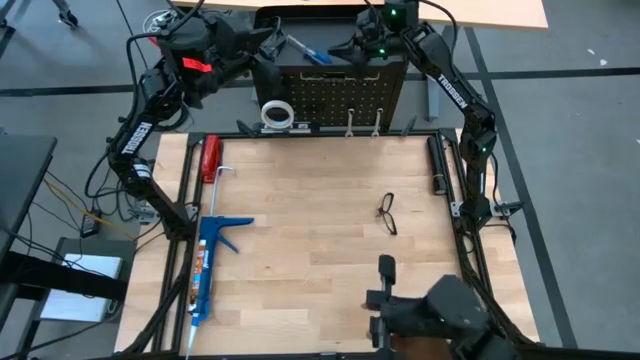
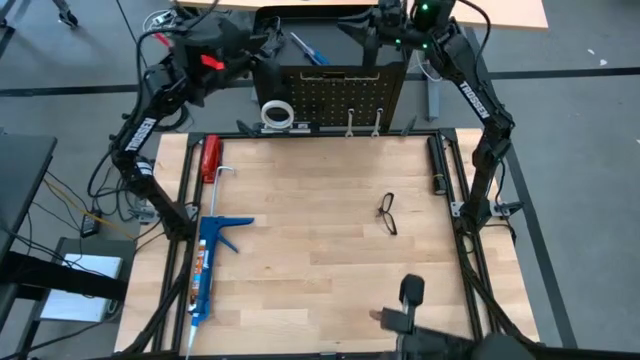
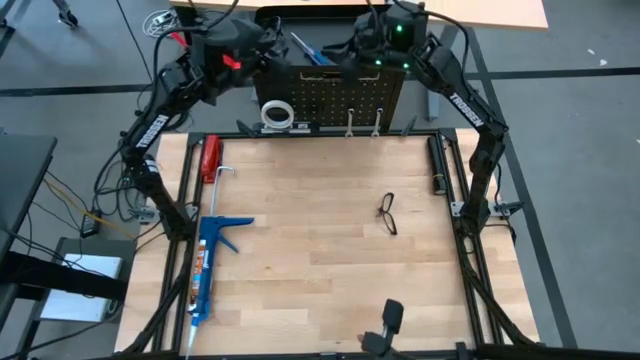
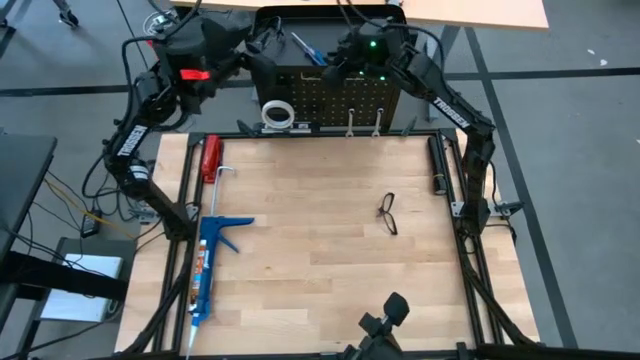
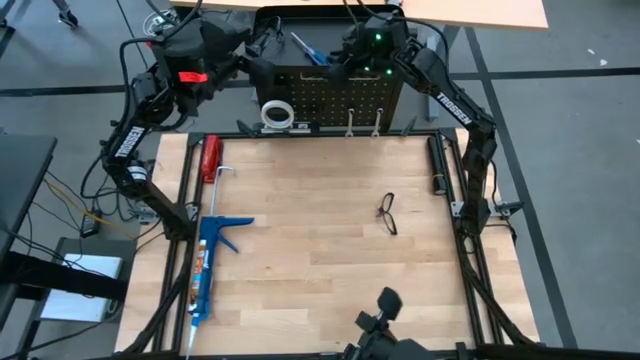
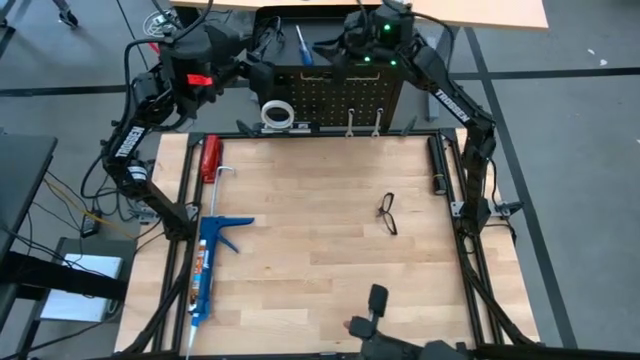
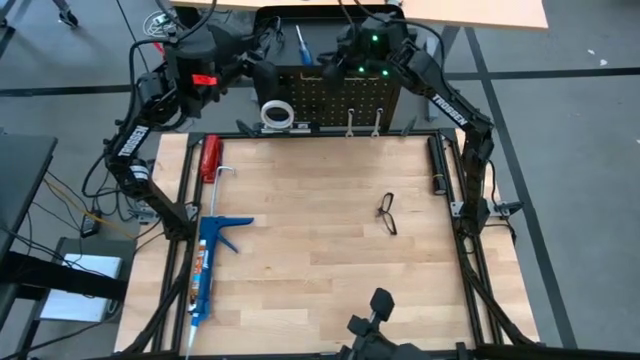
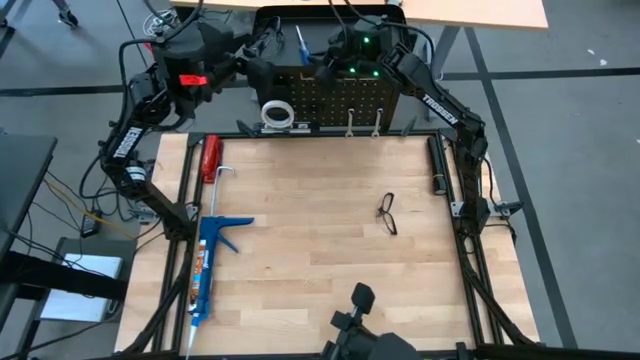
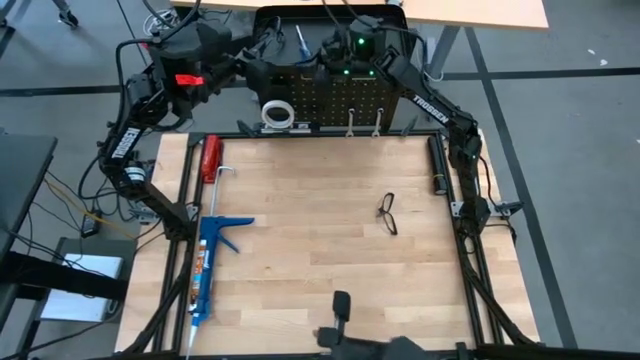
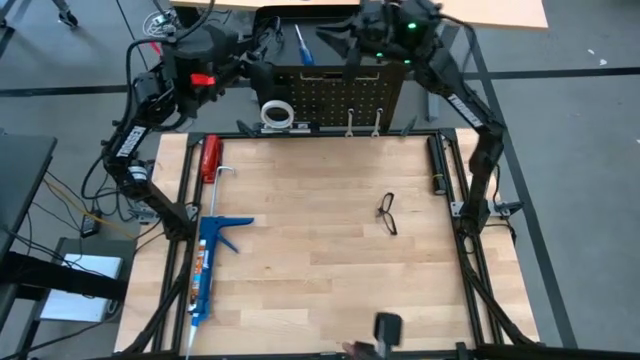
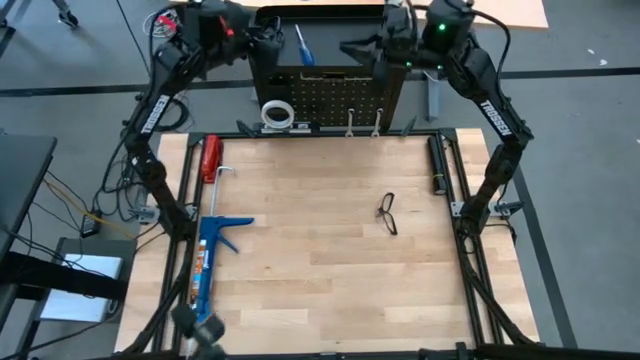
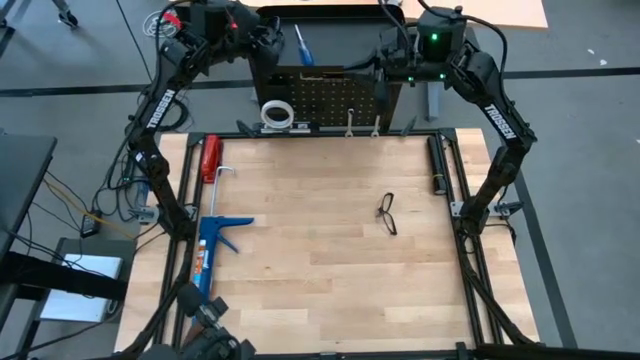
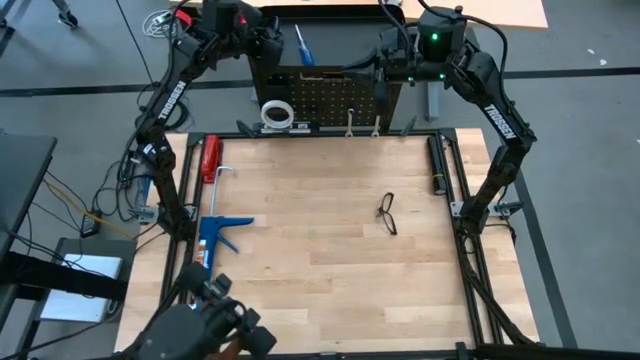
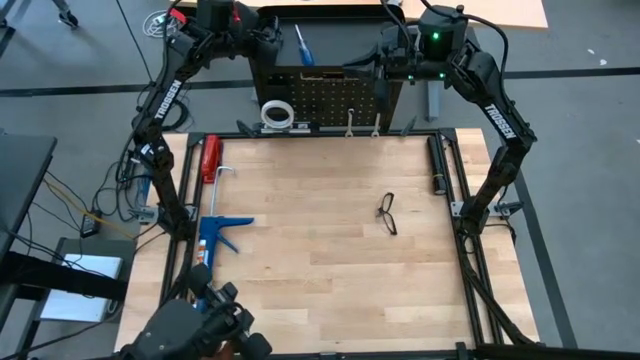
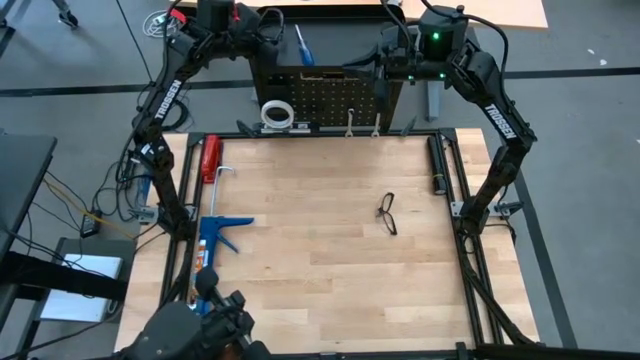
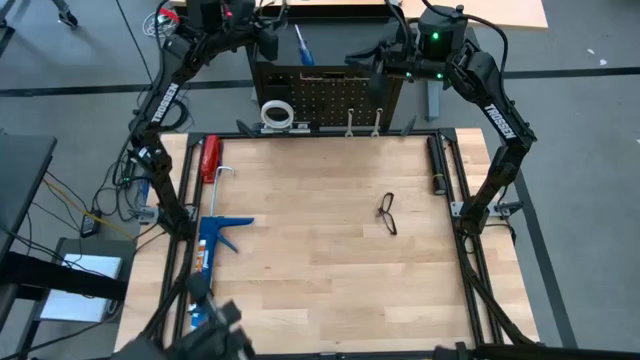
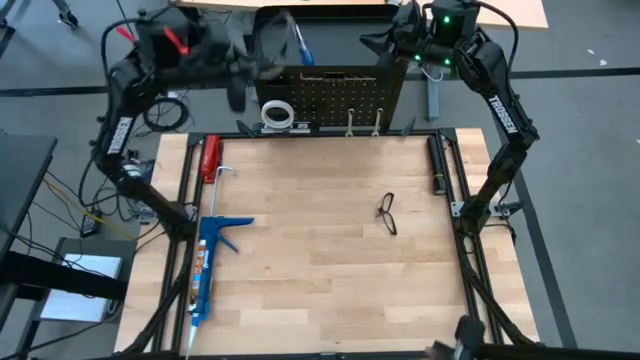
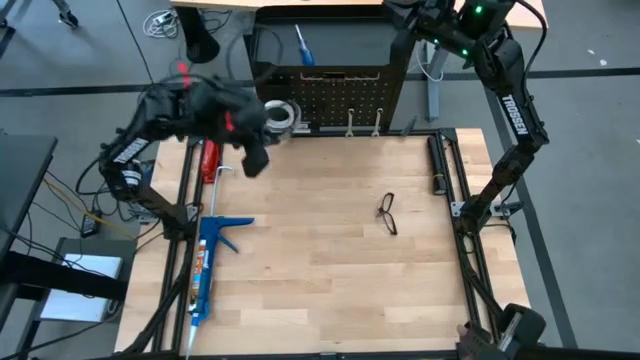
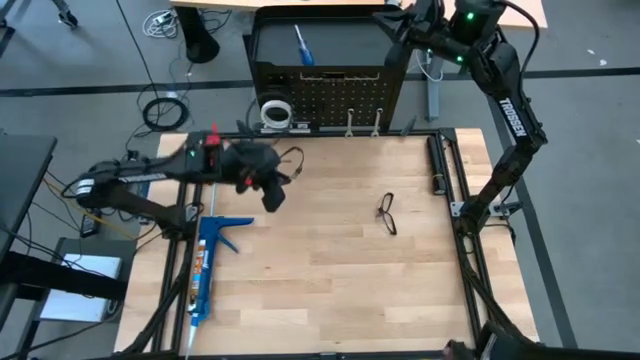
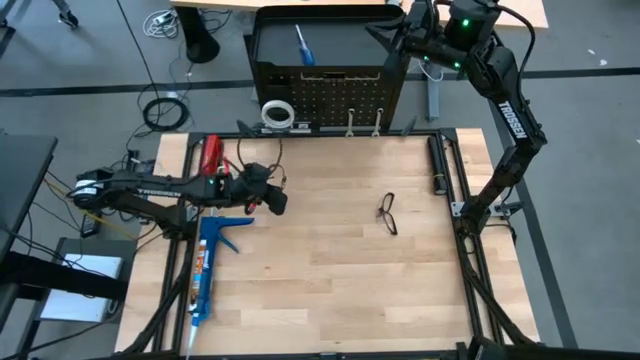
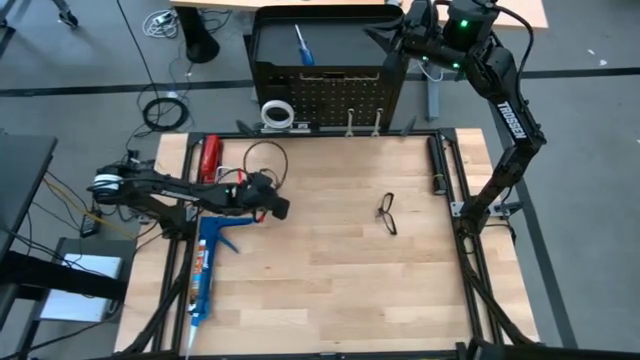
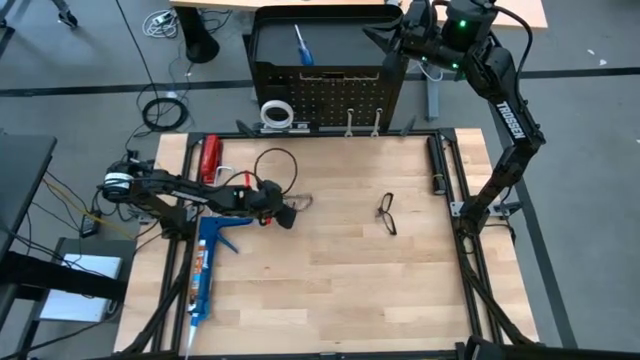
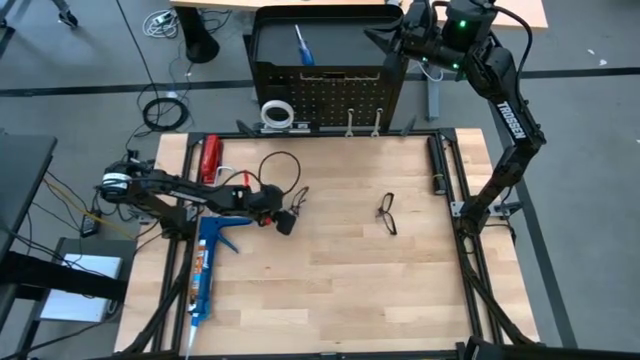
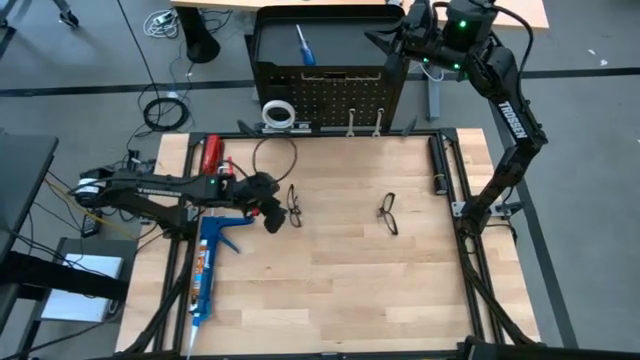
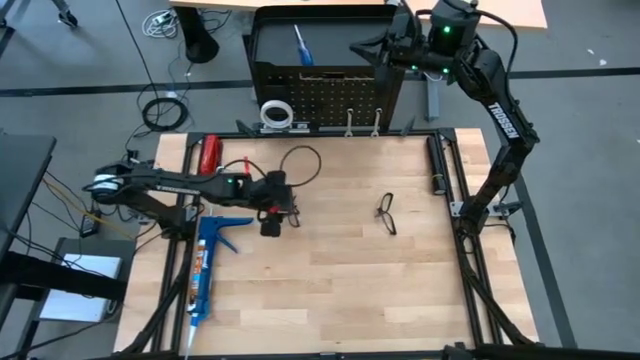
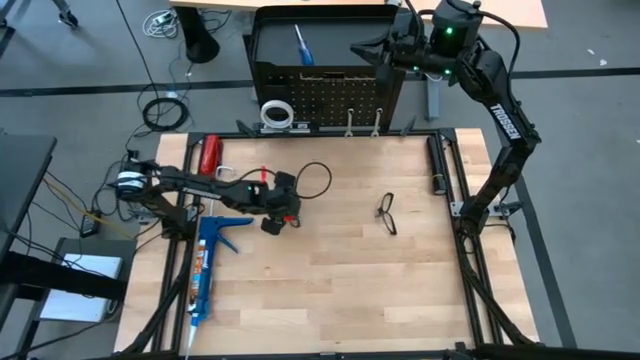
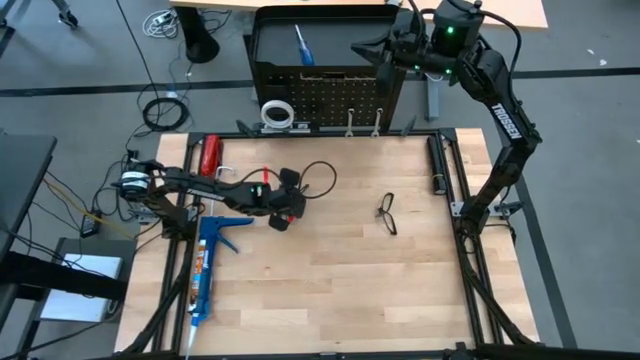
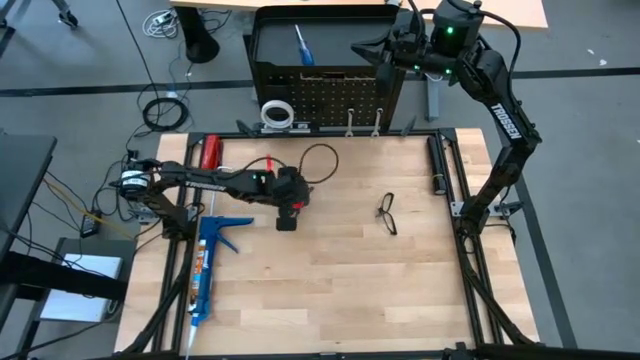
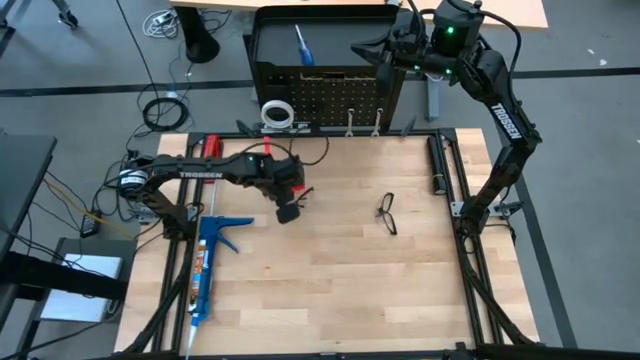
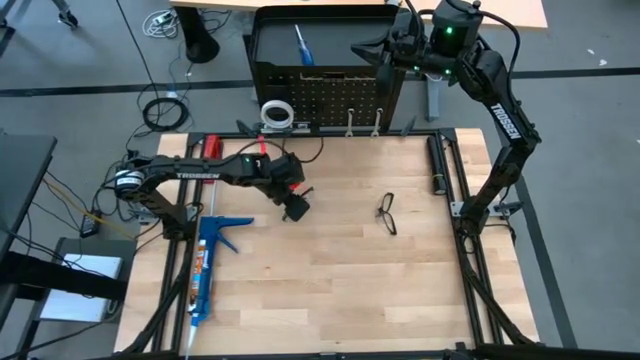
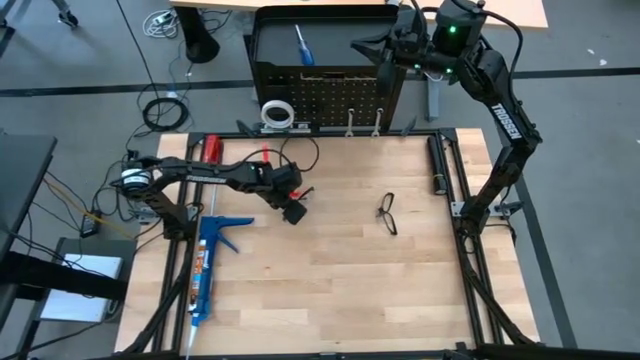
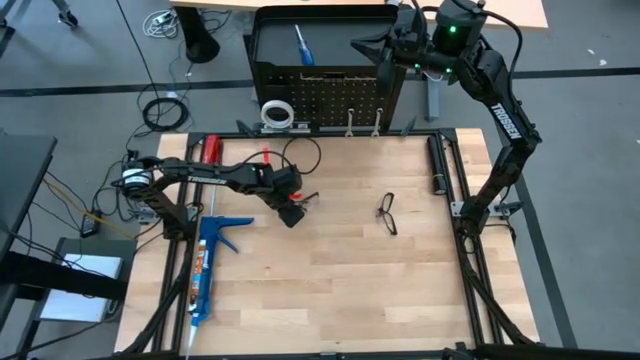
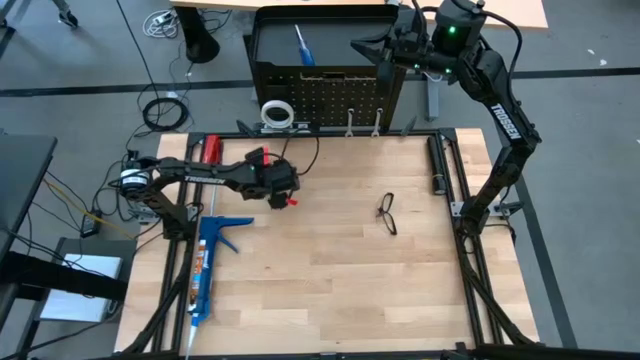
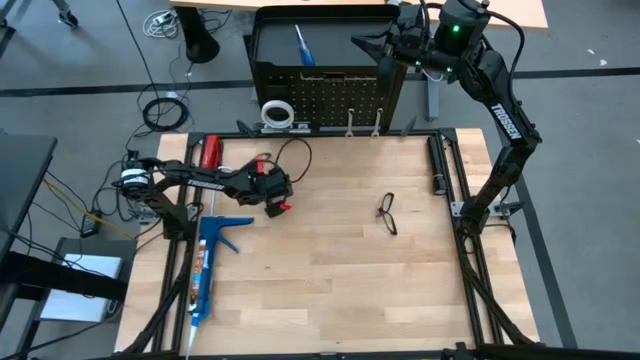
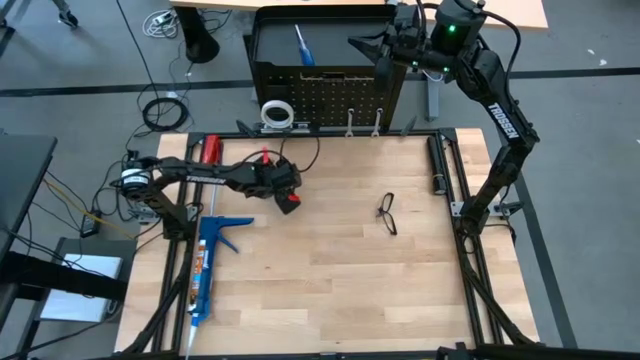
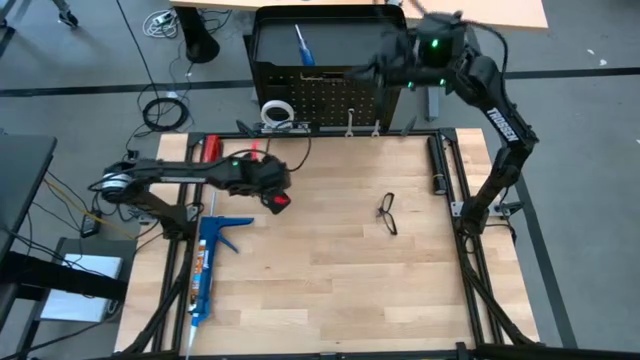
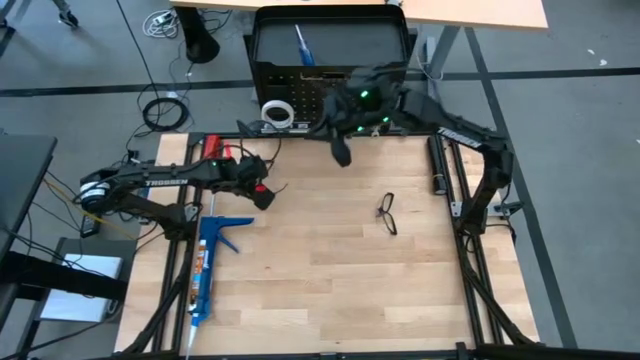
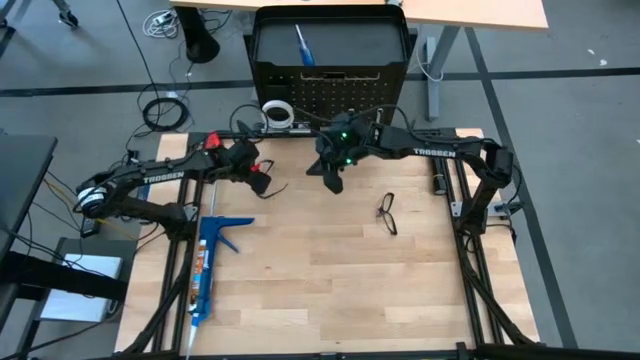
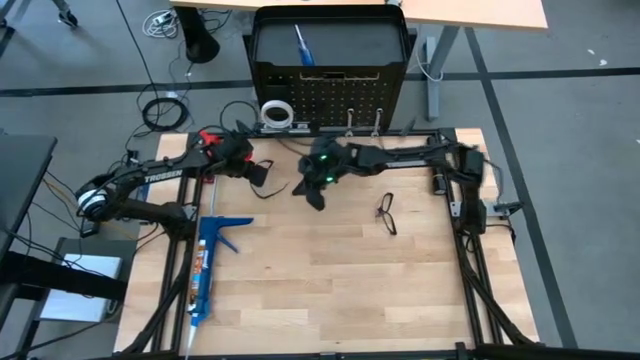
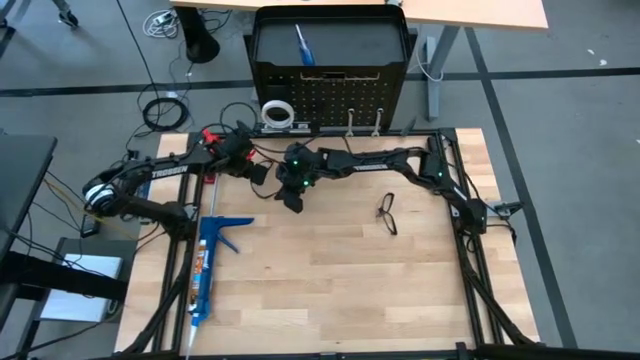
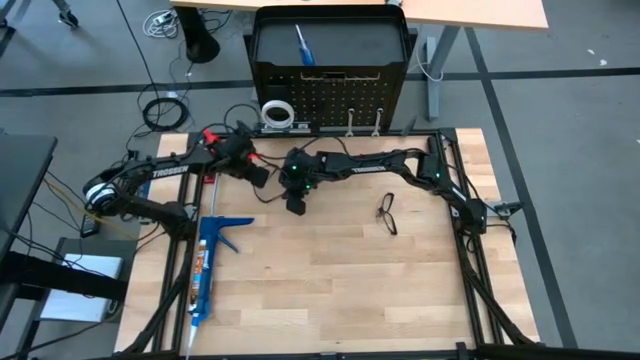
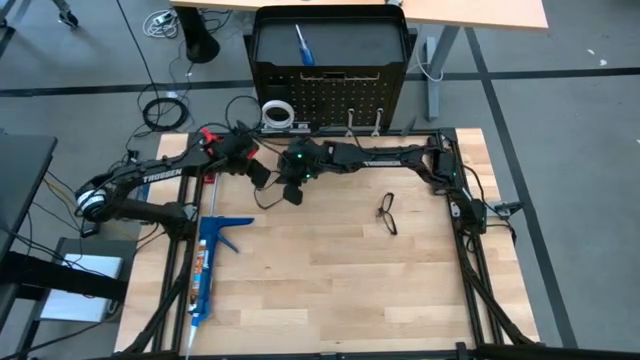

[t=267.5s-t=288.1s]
Task: Hang tools onto peg board
Remove the black safety glasses from the black pegboard
